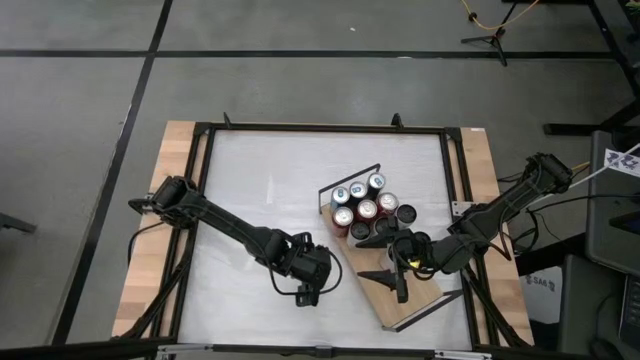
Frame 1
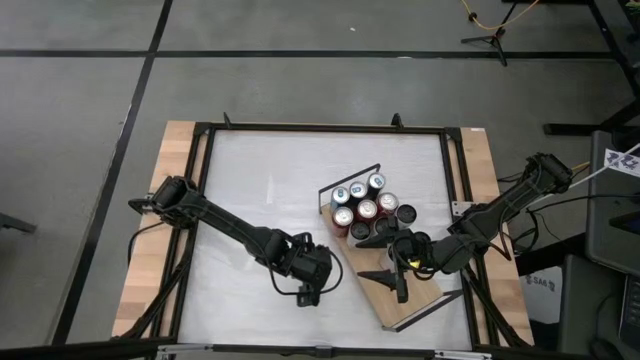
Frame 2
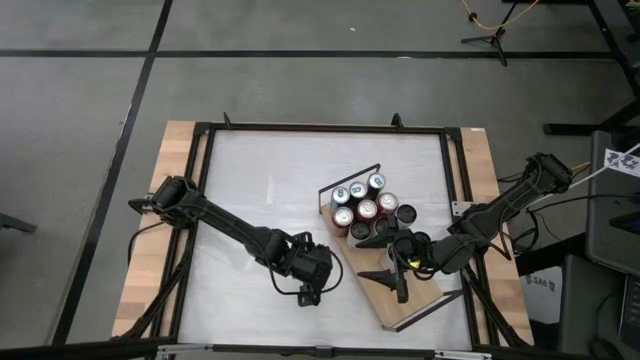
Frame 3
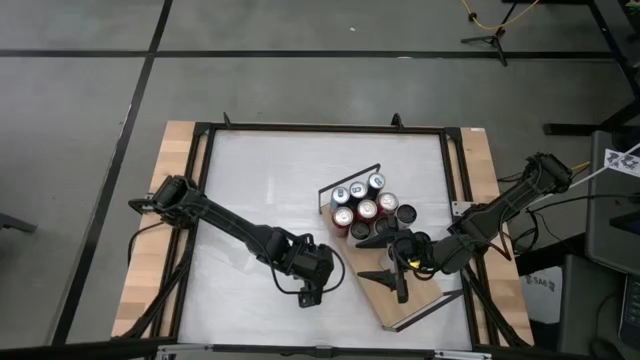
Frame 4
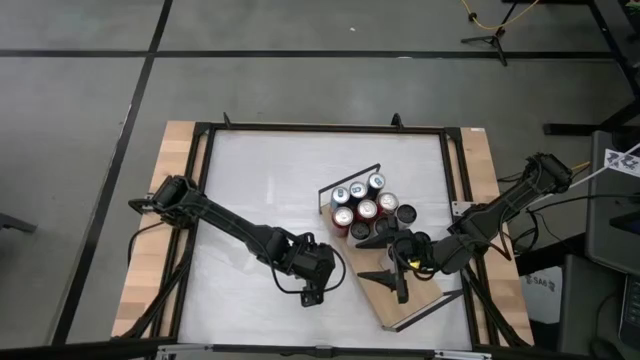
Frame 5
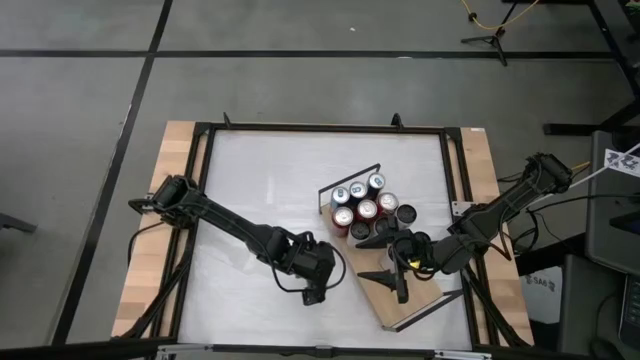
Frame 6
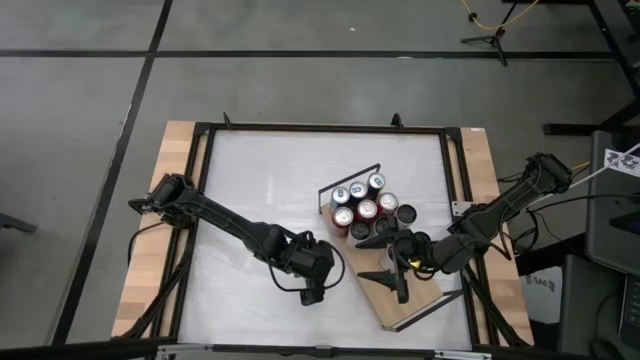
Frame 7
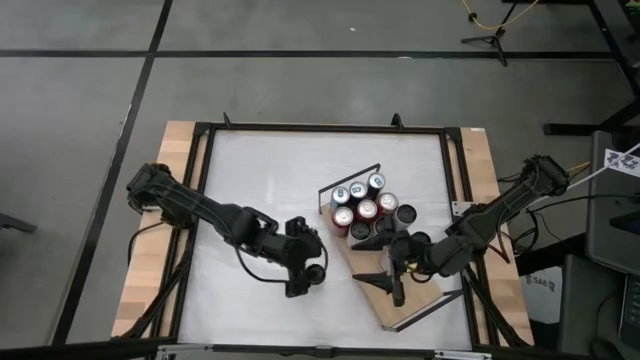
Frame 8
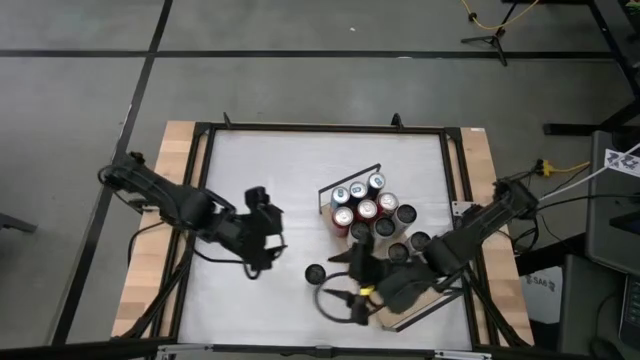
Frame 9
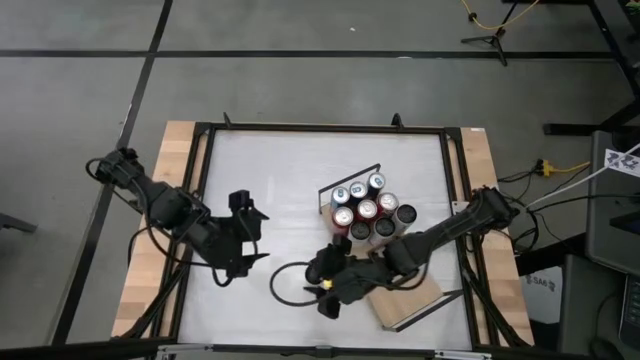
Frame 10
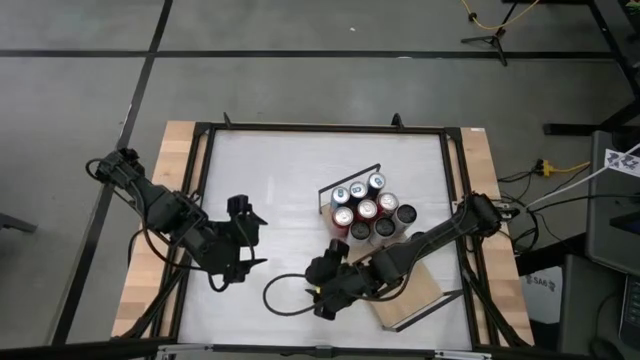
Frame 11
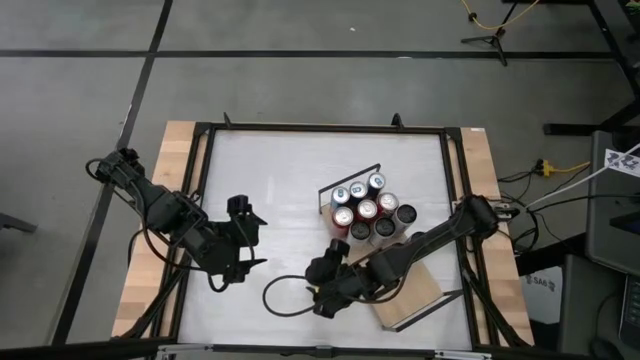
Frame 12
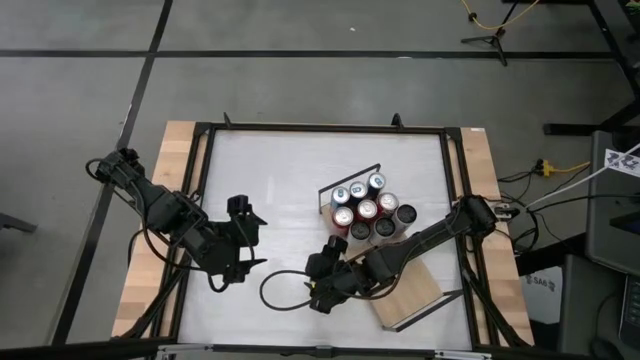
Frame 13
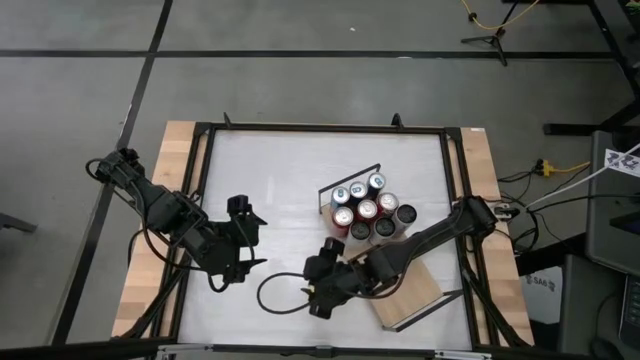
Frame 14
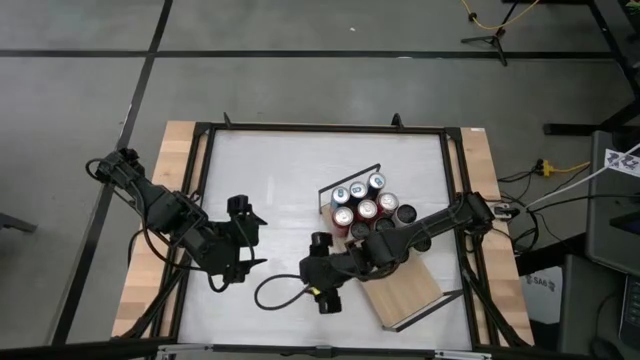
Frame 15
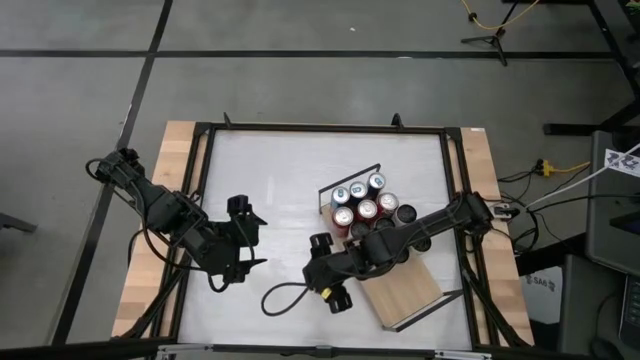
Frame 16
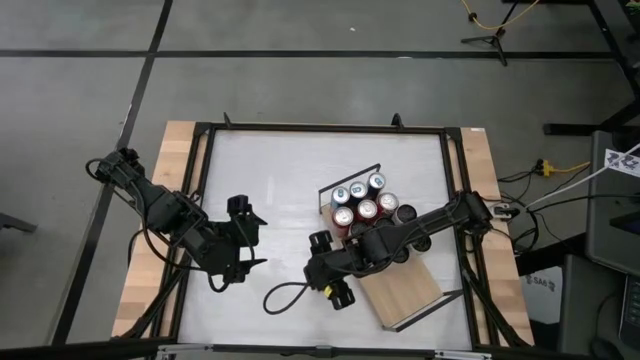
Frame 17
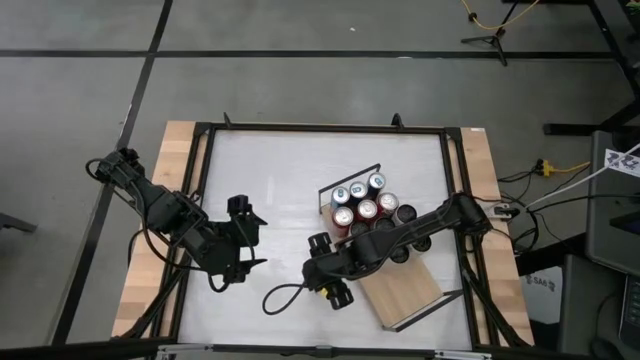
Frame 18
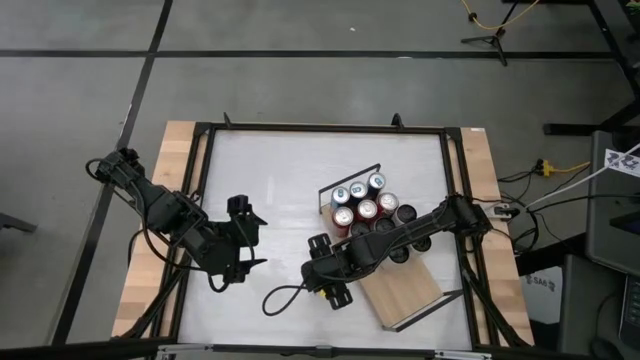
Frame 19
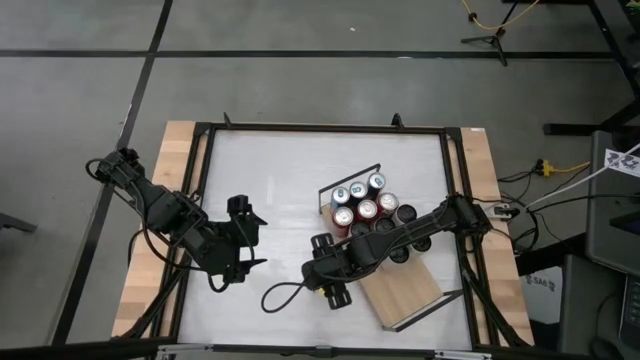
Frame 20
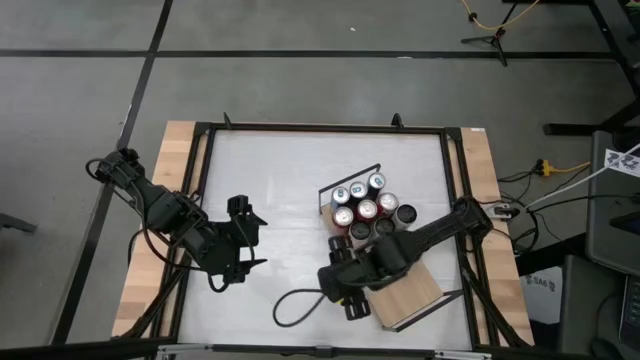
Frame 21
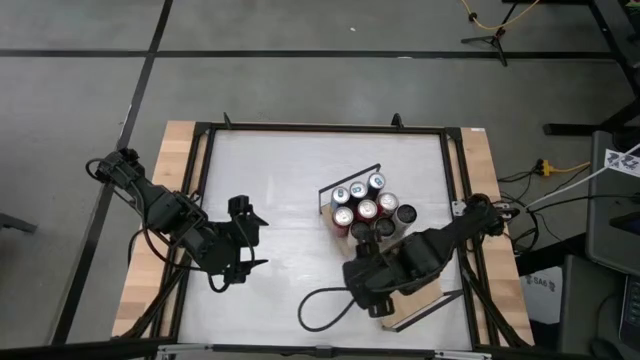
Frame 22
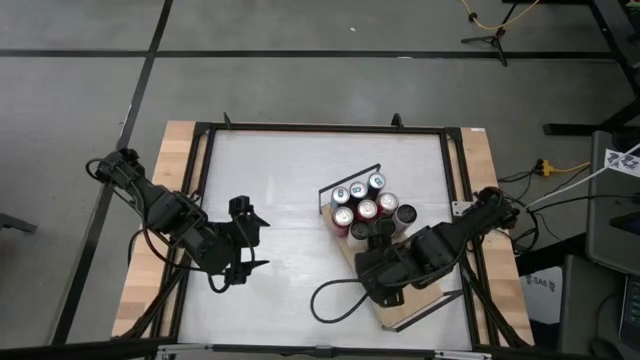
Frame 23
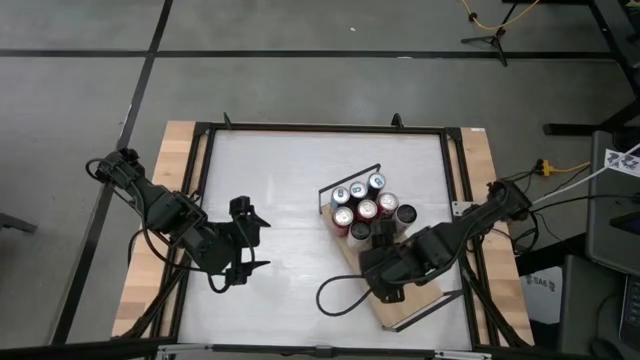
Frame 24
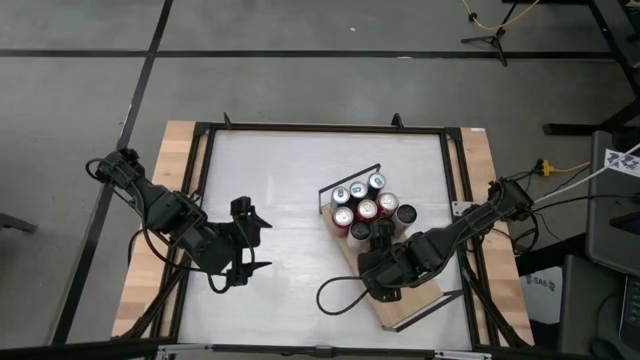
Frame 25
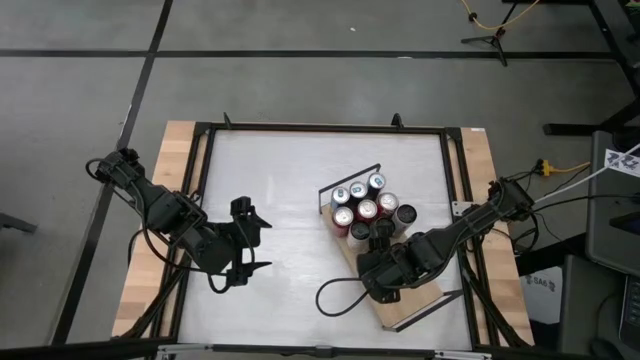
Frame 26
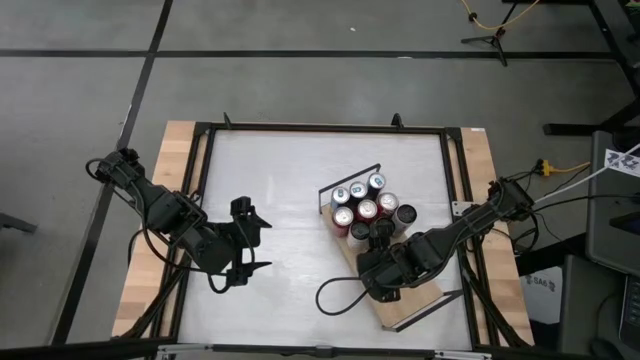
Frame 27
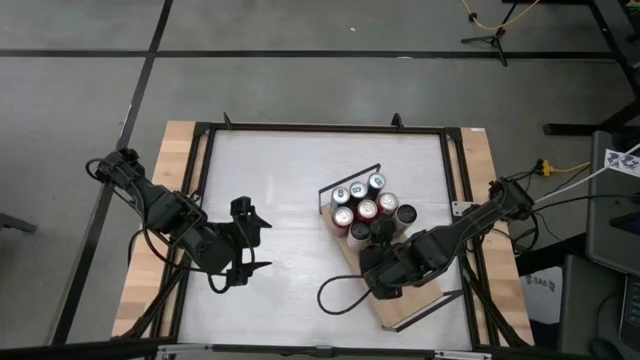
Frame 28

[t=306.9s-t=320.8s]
Task: Place canned beverage on shelf
Put the white pink soda can on the shelf aligned with the other white pink soda cans

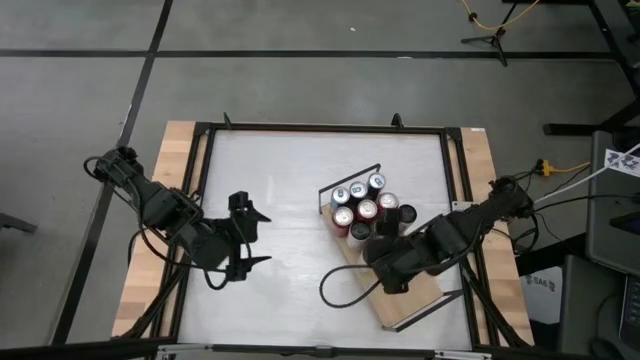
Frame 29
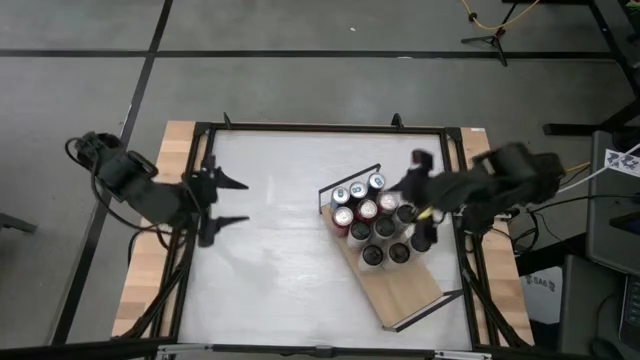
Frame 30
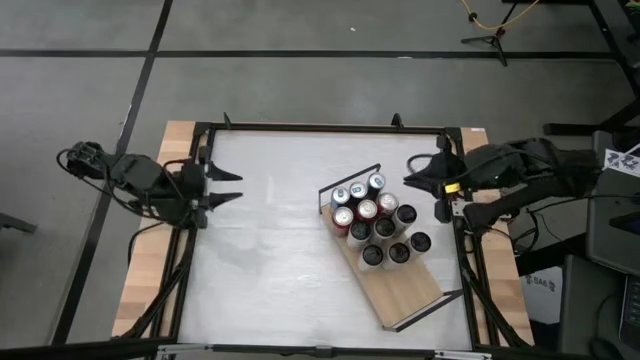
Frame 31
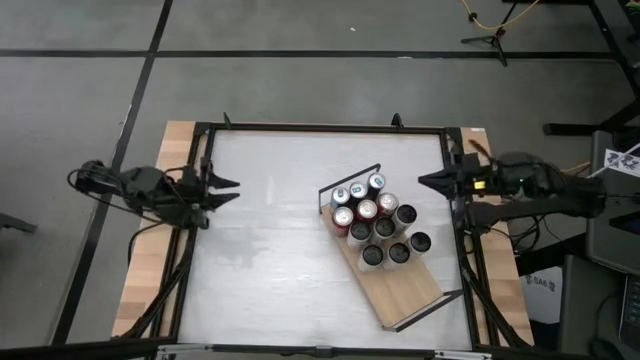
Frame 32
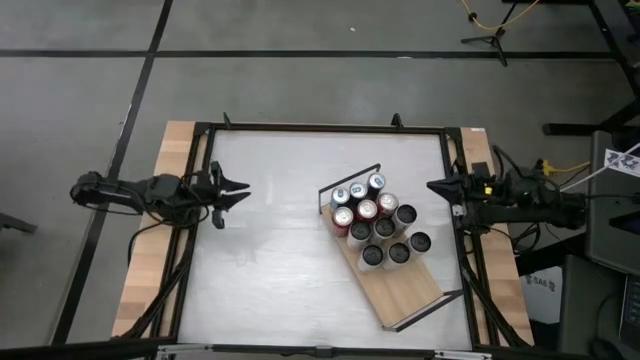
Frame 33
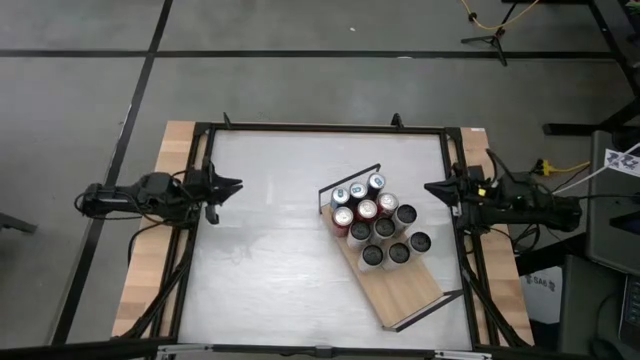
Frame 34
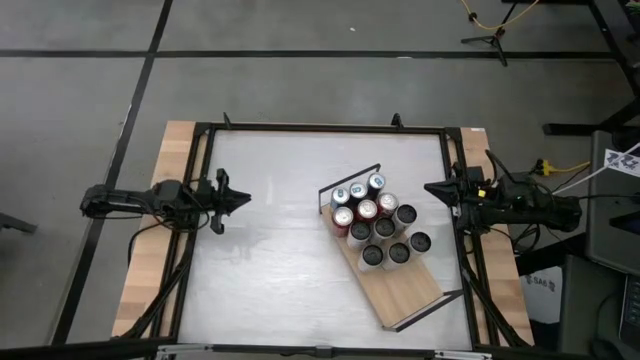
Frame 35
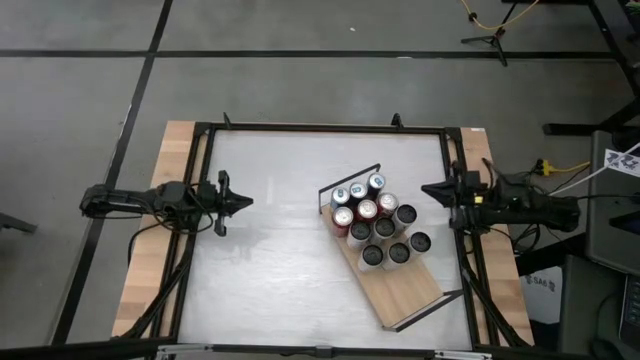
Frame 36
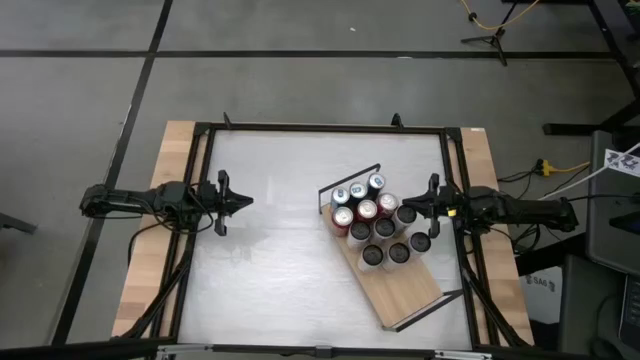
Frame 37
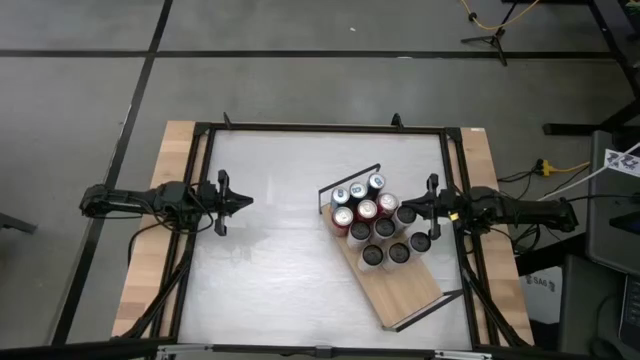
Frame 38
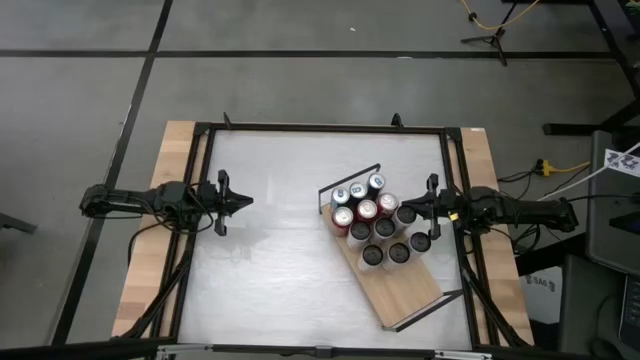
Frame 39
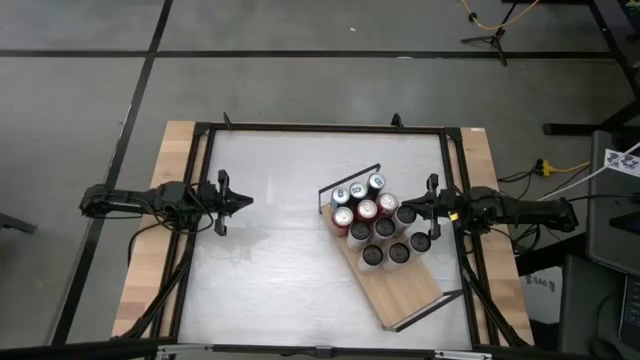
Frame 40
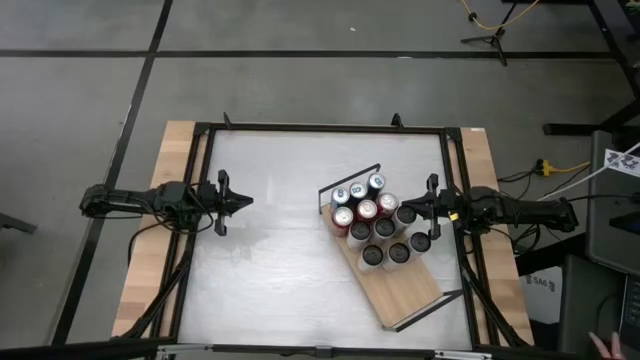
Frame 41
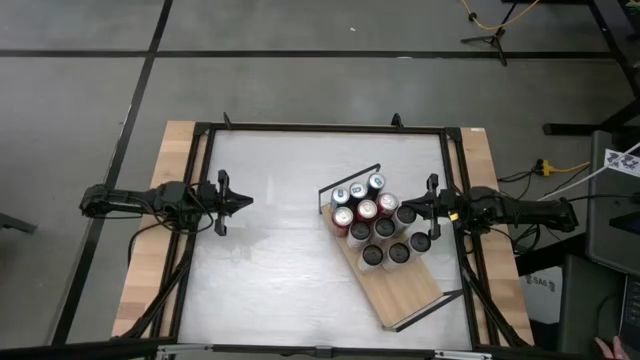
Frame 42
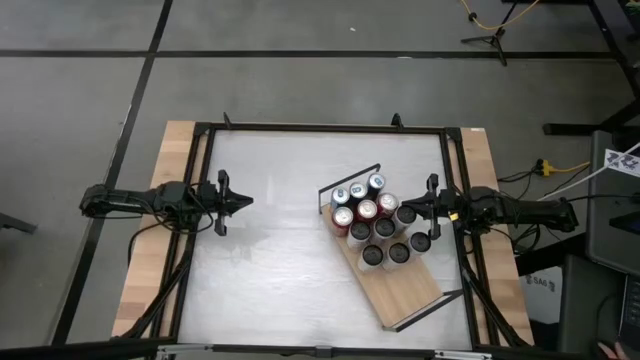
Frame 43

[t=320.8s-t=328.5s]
Return to Home Position
